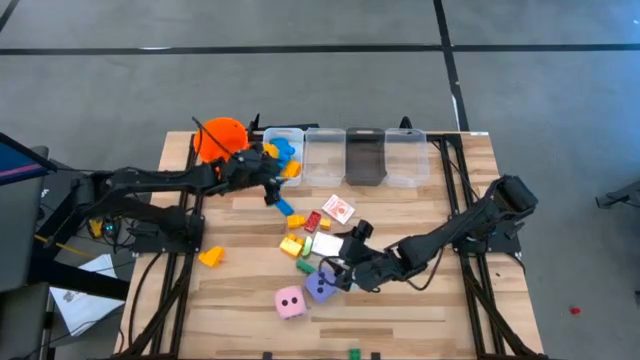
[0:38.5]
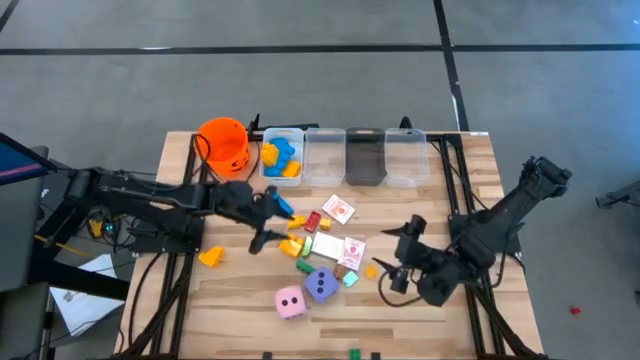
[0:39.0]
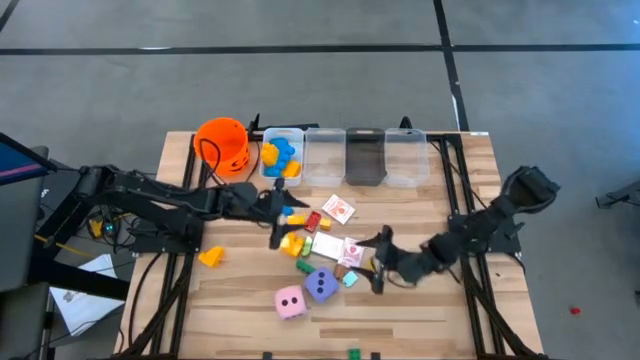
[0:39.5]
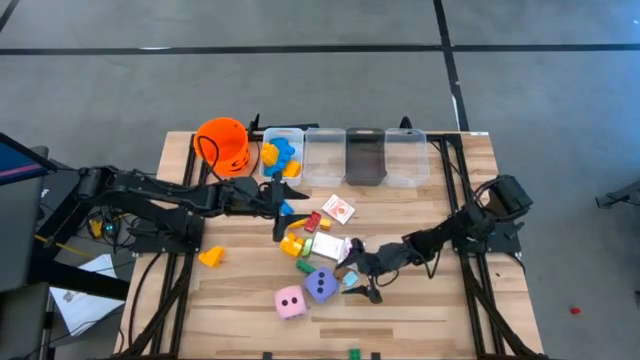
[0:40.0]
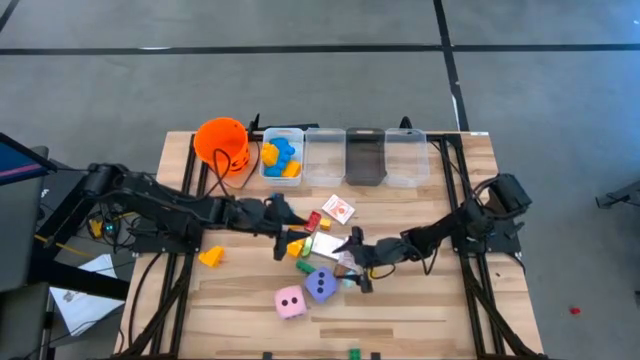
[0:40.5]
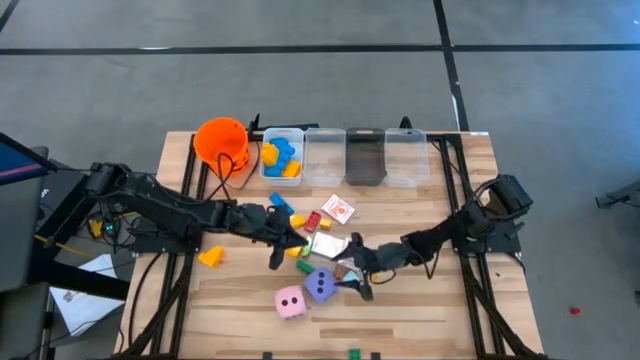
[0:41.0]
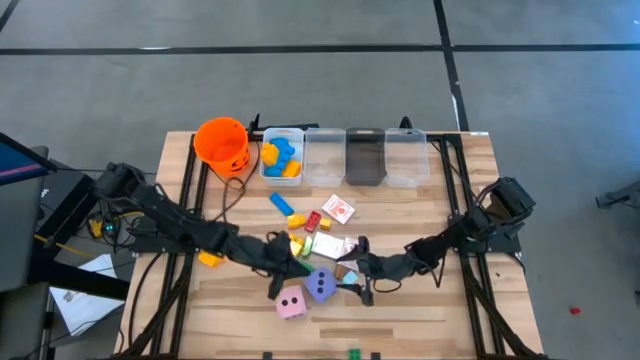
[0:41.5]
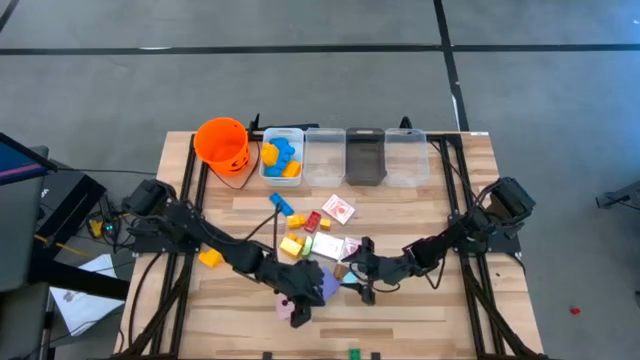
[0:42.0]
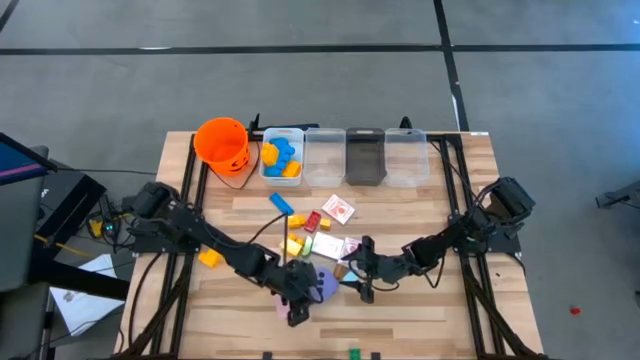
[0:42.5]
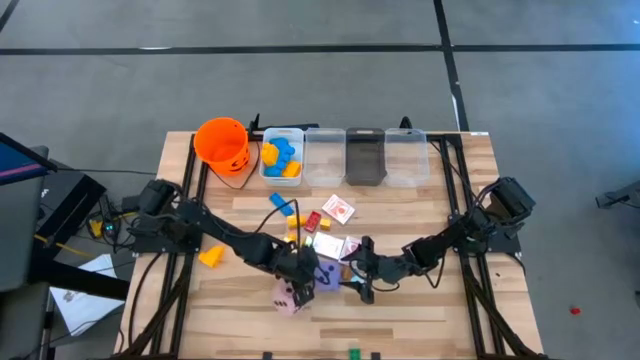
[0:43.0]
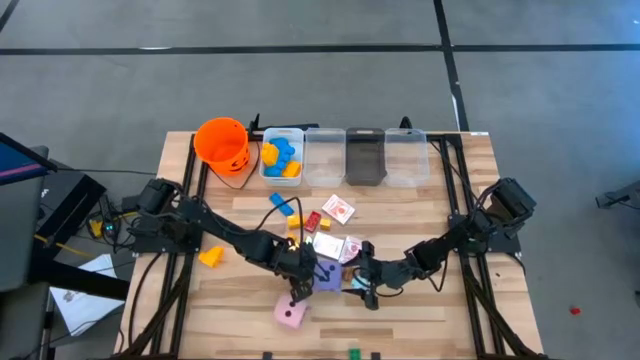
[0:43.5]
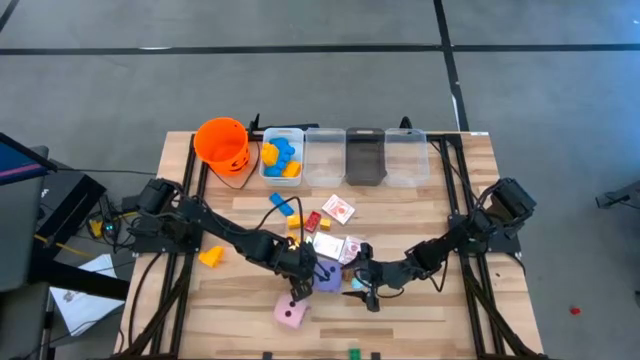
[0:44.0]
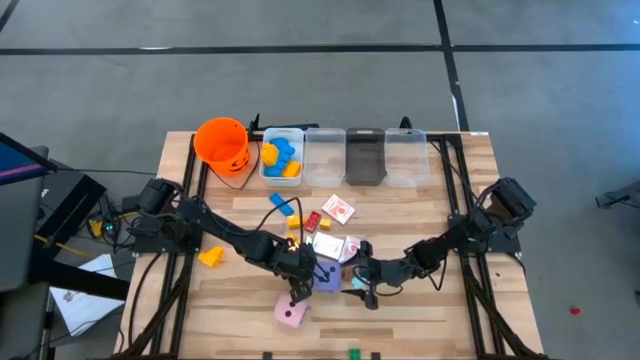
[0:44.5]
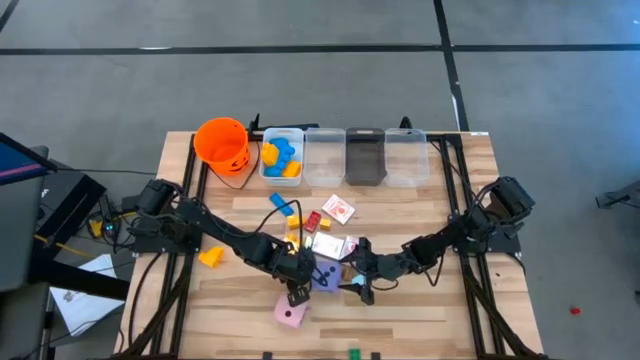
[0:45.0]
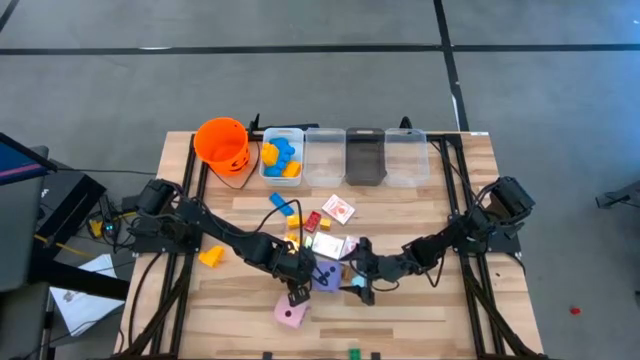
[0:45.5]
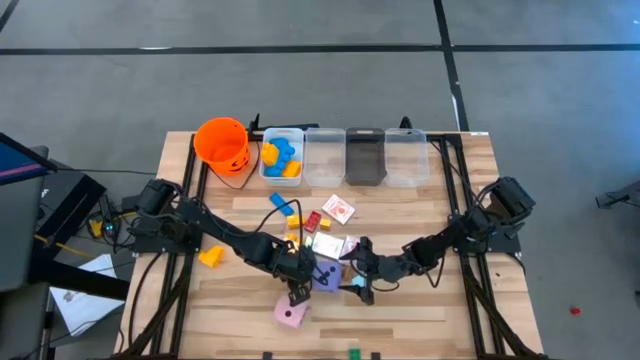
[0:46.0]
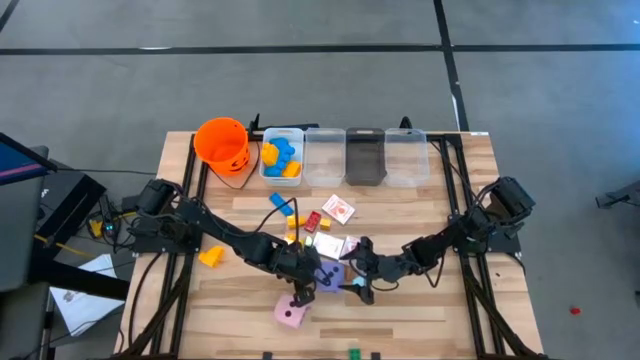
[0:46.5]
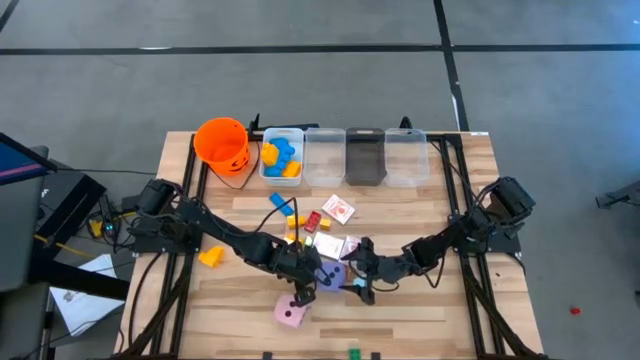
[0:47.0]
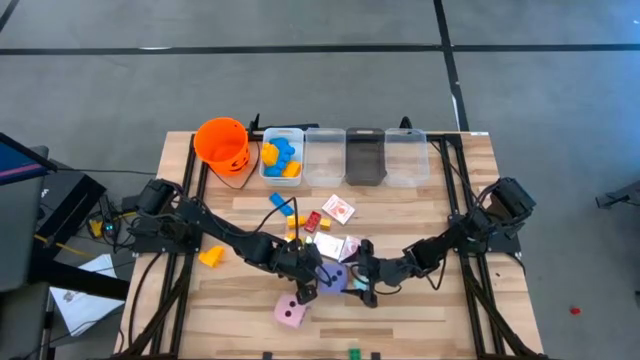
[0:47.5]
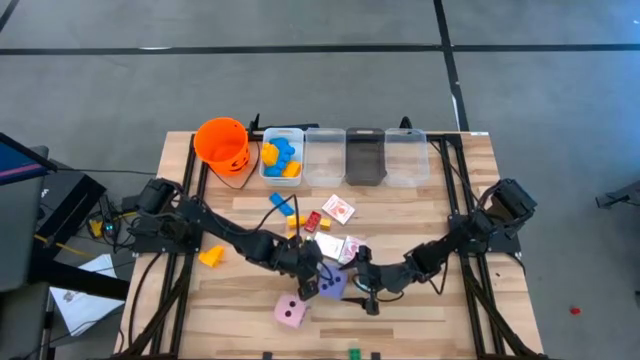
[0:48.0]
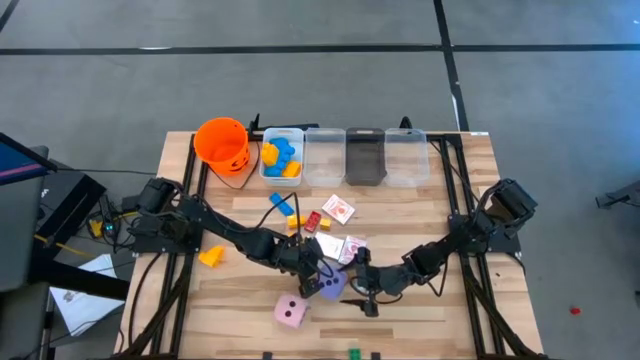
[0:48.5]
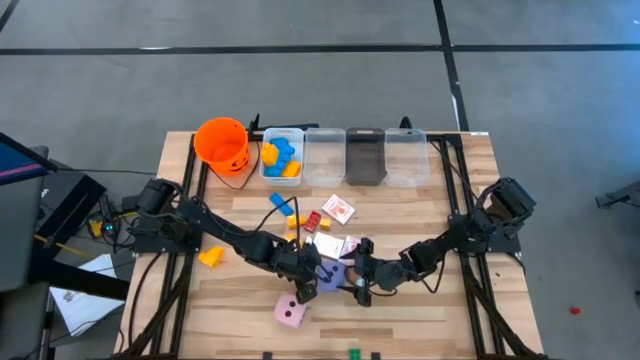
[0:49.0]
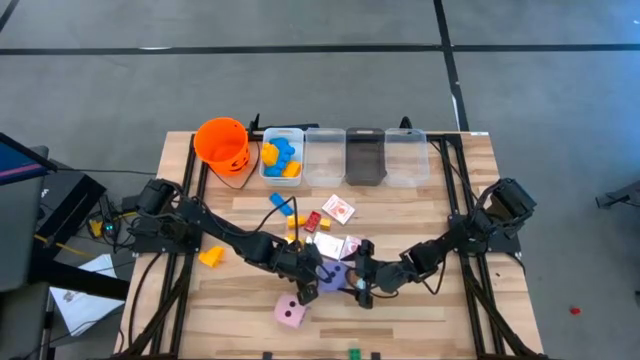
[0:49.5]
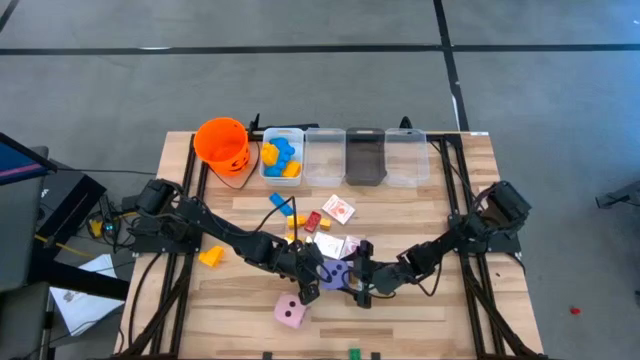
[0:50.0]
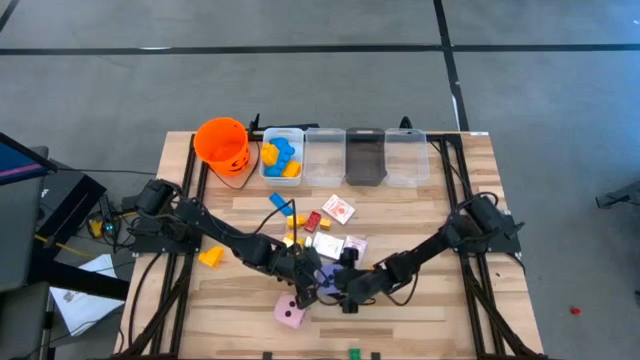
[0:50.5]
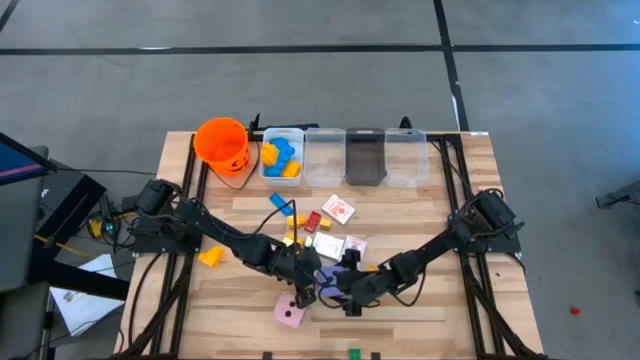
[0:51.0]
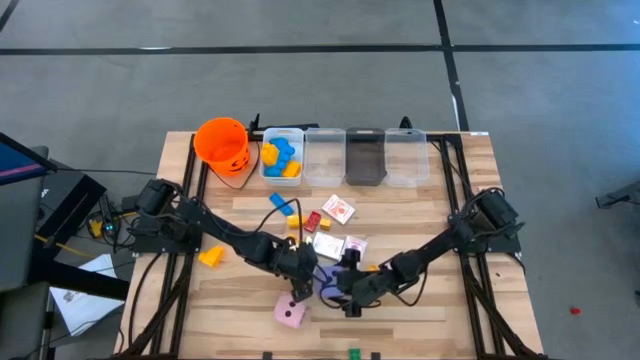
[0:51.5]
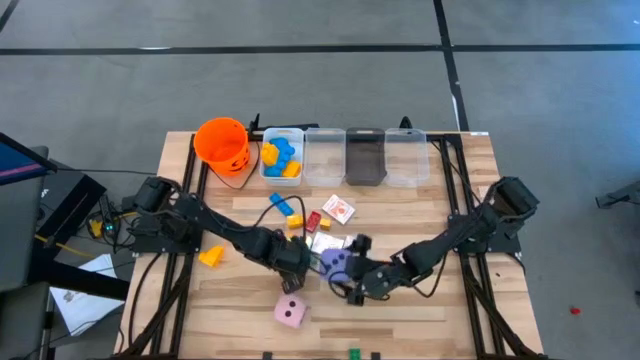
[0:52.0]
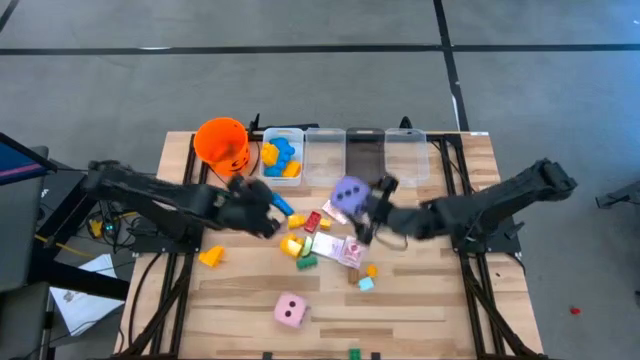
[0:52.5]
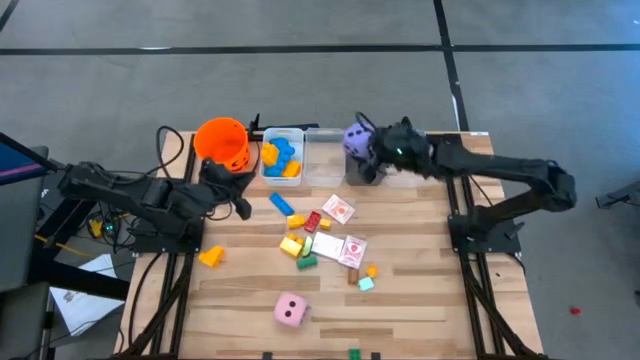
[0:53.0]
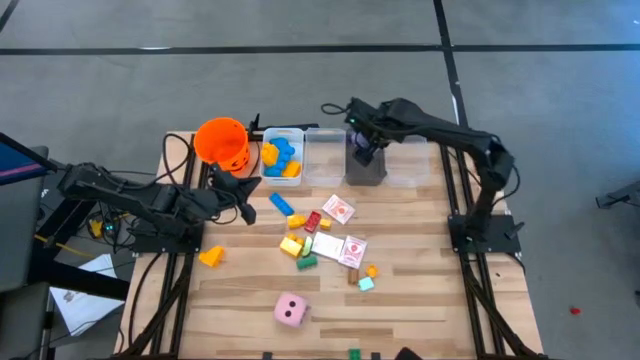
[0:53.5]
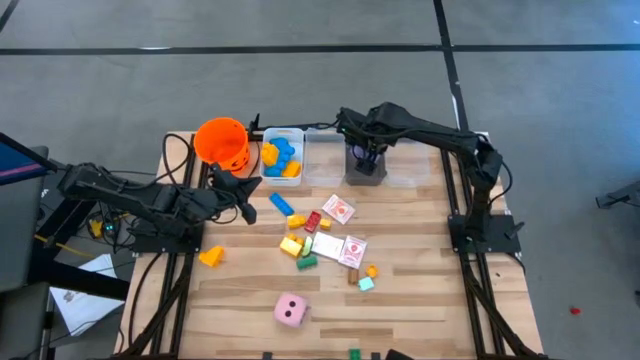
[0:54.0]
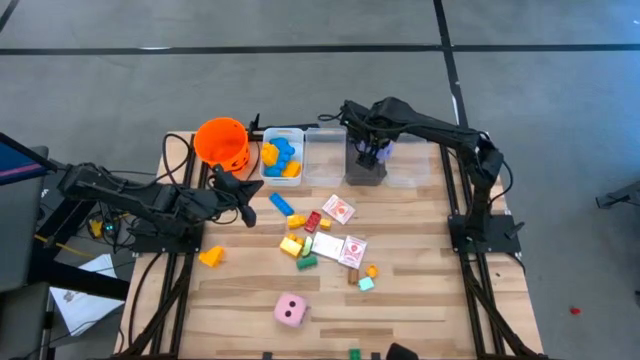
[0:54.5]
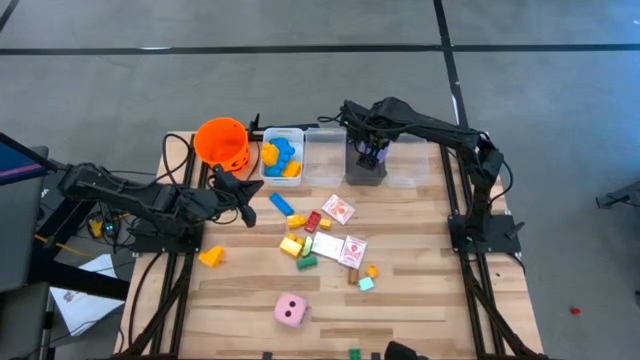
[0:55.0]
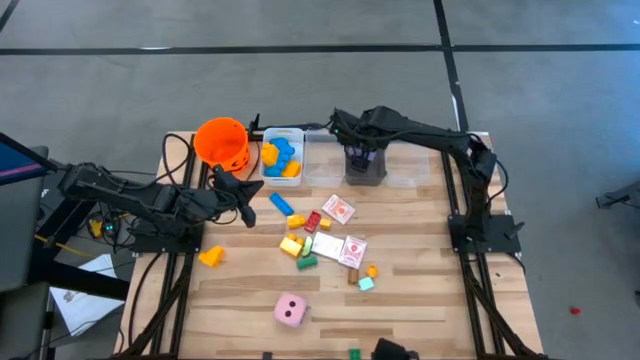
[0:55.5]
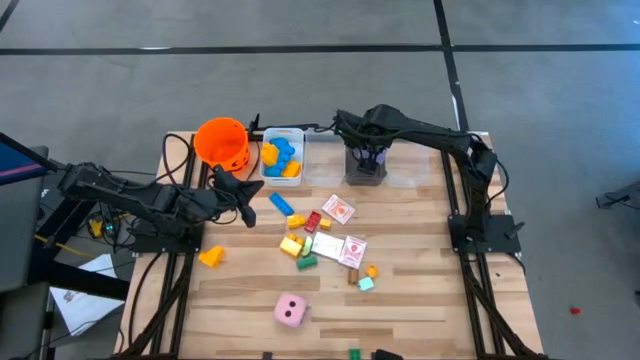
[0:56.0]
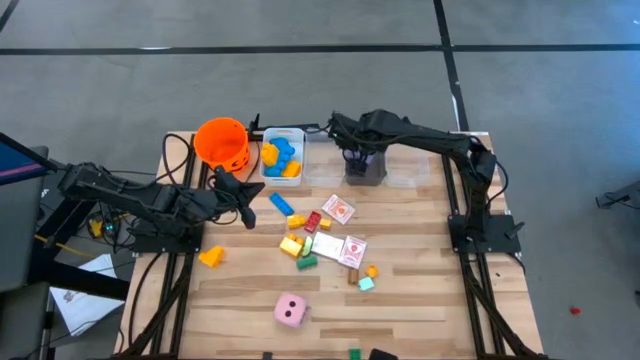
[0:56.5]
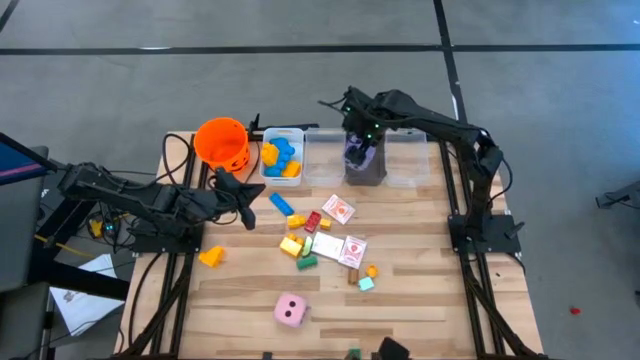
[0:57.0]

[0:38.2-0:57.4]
Task: Pick & Place Toys
Put the purple dice into the black bin

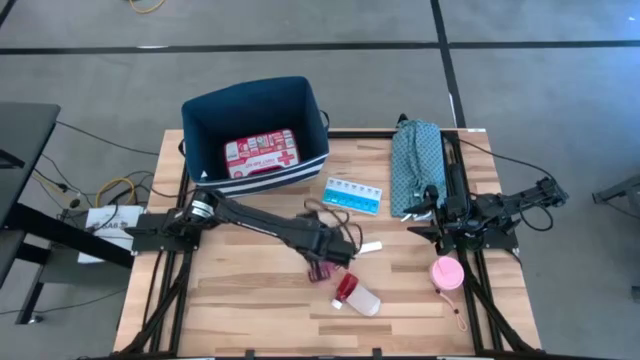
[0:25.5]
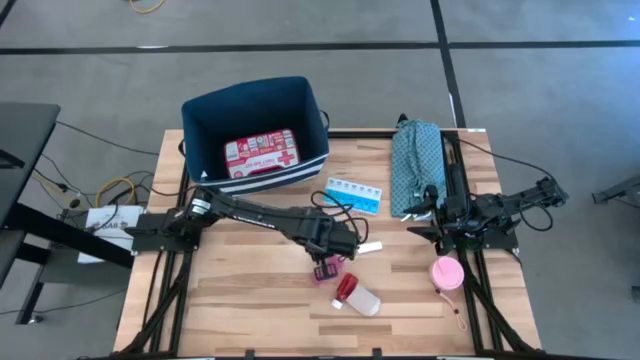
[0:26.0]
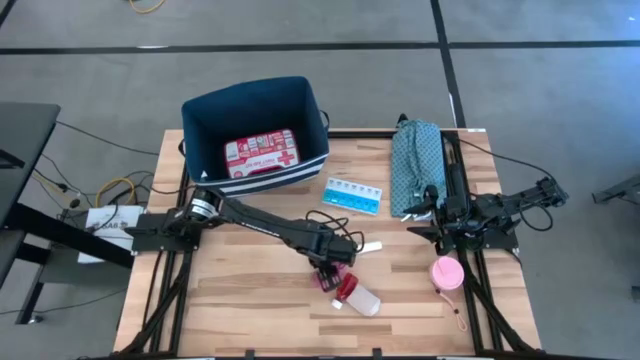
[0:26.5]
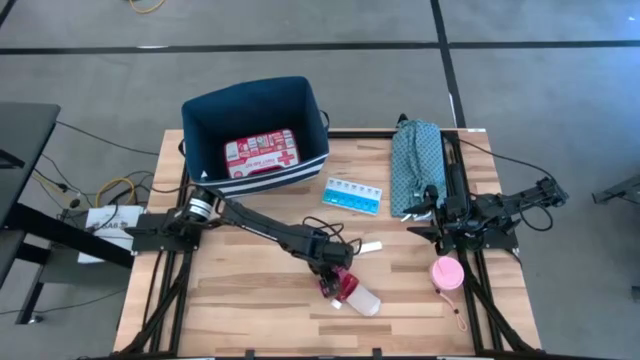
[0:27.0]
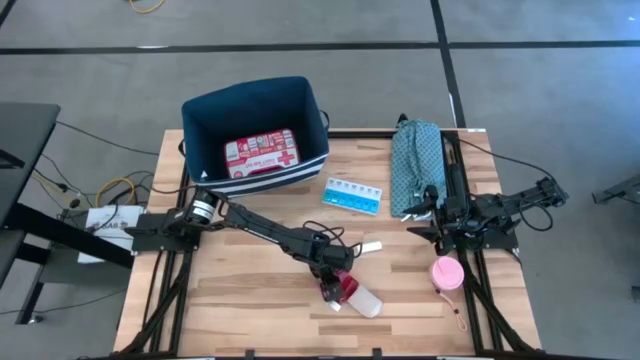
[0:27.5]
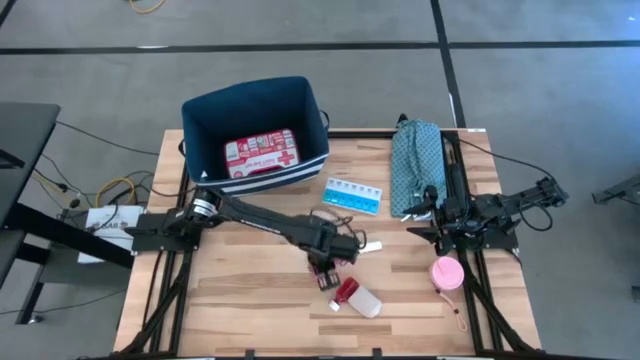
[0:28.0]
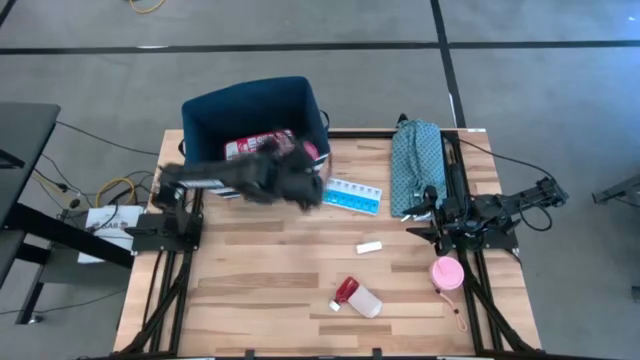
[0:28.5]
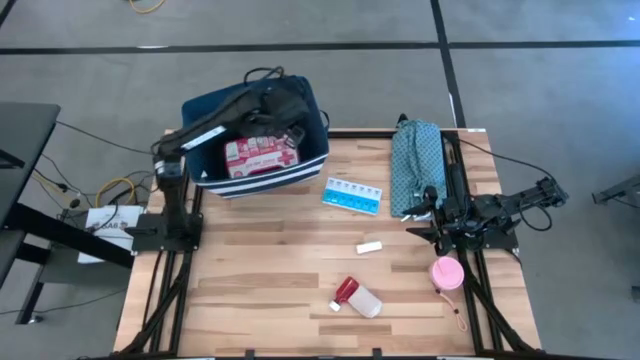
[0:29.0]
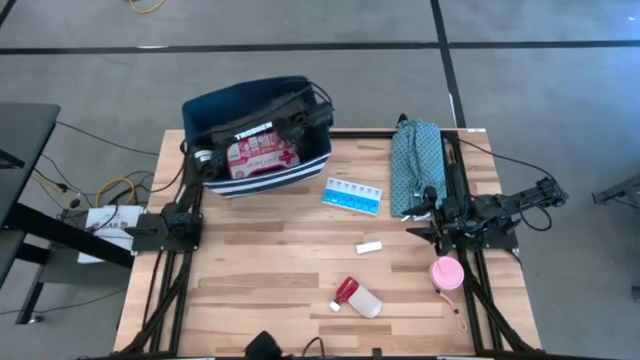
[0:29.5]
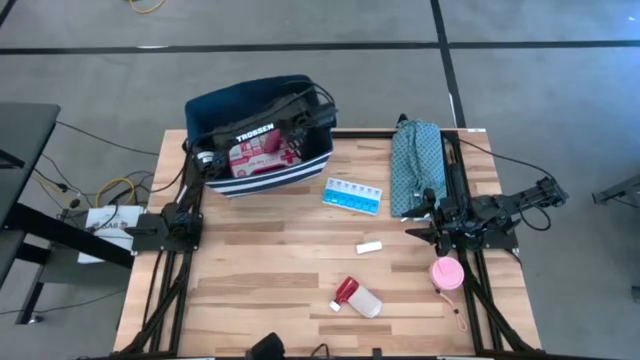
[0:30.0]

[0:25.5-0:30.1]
Task: Pick & place medical supplies in basket/bin
Put the pink bandage into the blue bin
